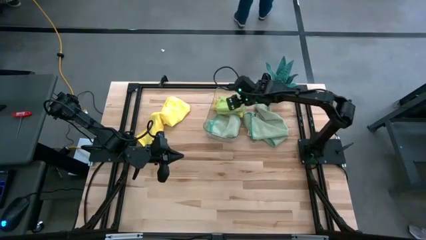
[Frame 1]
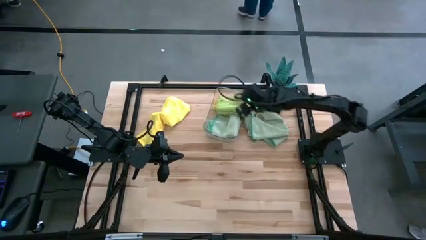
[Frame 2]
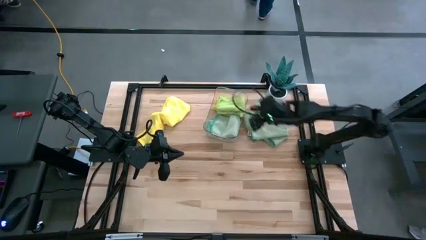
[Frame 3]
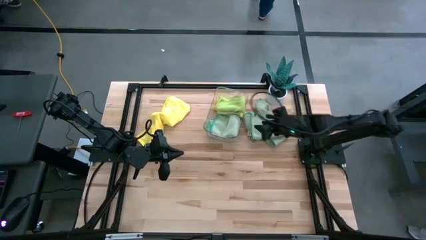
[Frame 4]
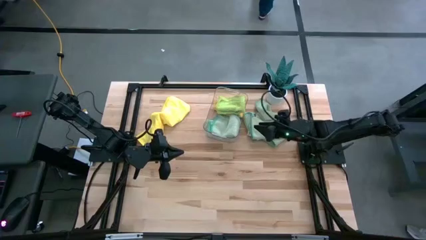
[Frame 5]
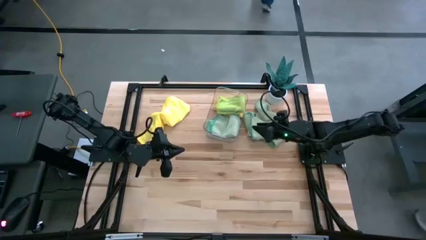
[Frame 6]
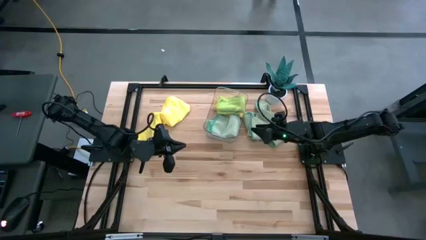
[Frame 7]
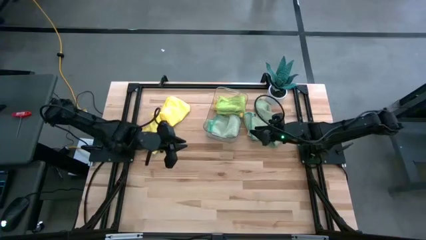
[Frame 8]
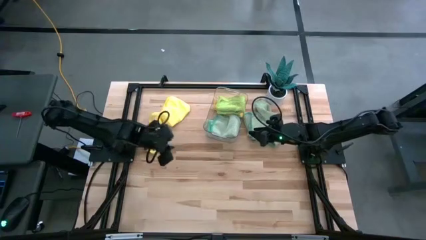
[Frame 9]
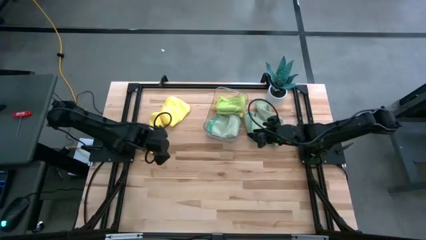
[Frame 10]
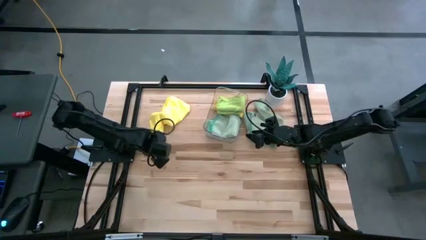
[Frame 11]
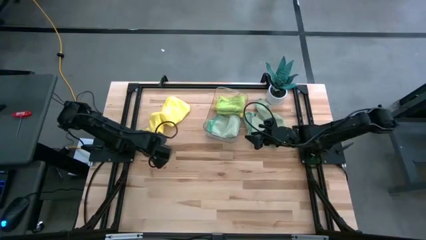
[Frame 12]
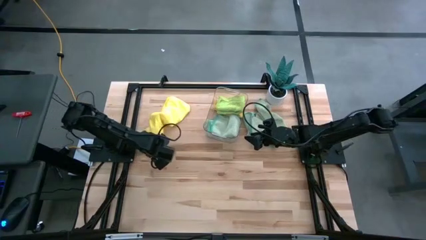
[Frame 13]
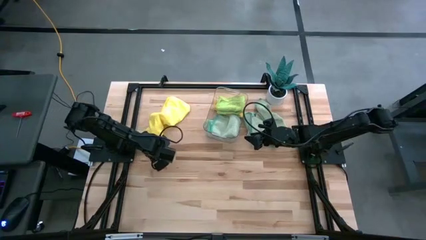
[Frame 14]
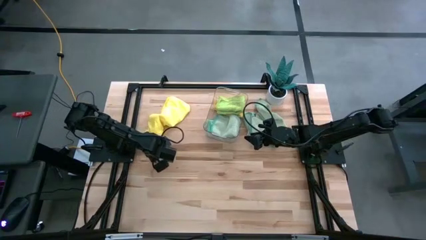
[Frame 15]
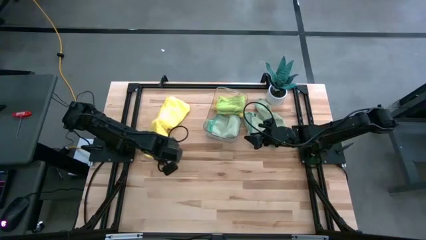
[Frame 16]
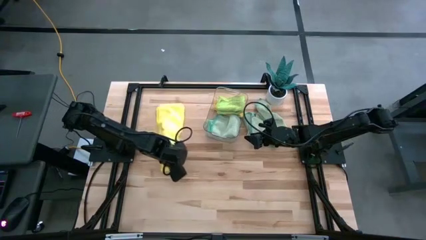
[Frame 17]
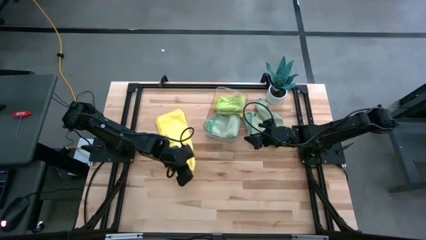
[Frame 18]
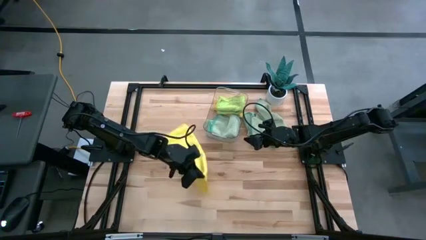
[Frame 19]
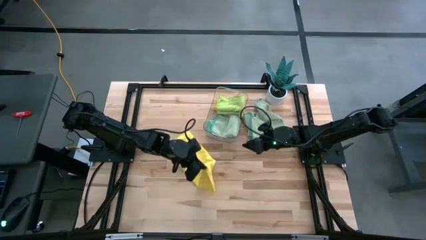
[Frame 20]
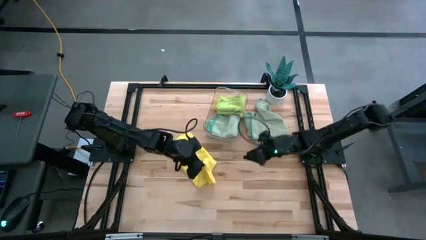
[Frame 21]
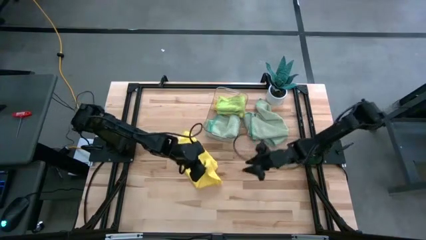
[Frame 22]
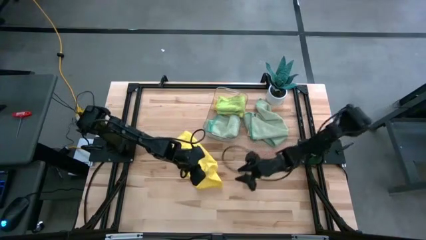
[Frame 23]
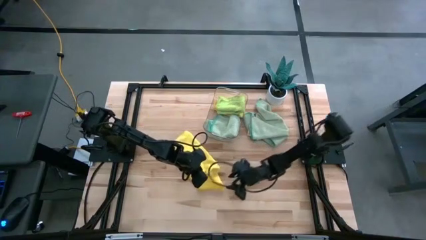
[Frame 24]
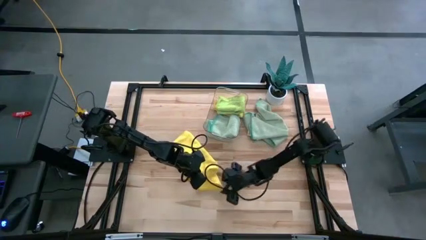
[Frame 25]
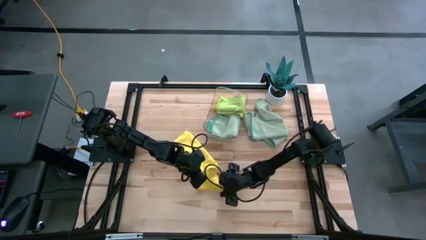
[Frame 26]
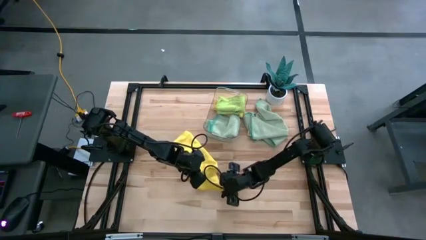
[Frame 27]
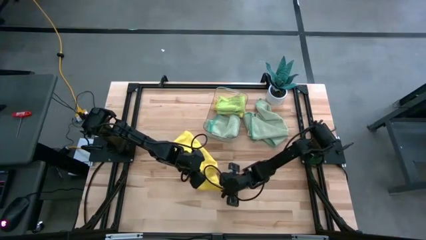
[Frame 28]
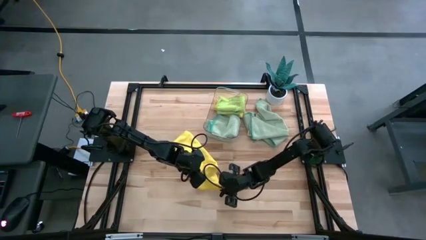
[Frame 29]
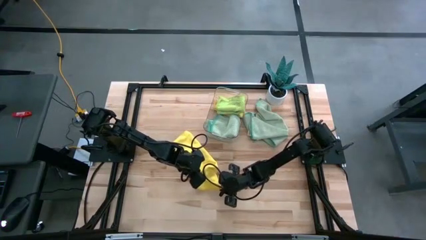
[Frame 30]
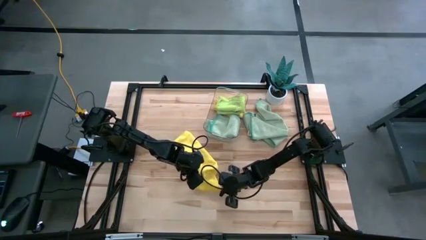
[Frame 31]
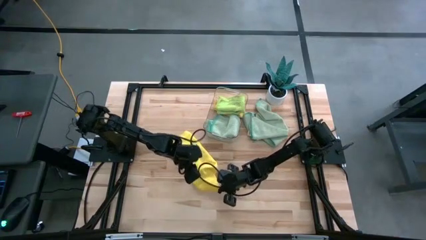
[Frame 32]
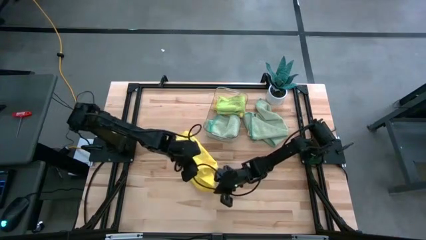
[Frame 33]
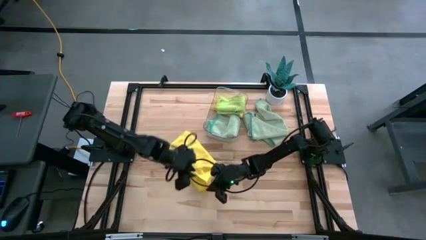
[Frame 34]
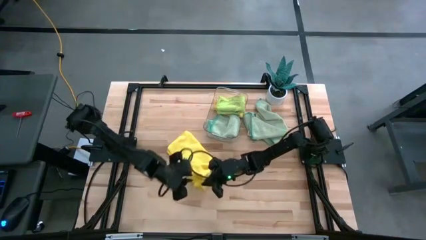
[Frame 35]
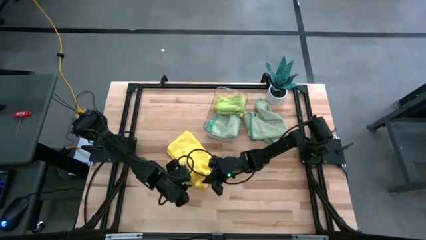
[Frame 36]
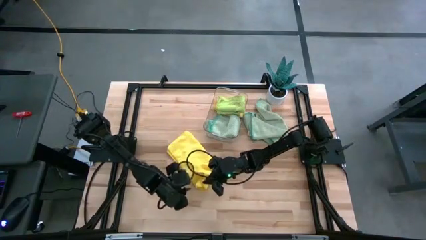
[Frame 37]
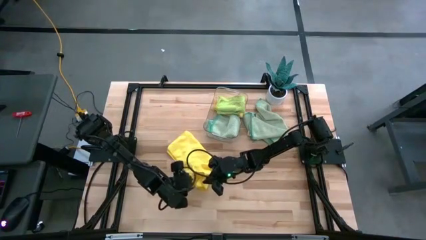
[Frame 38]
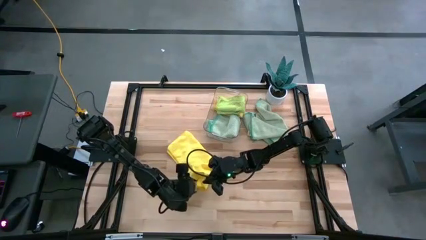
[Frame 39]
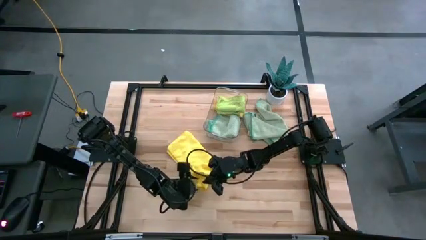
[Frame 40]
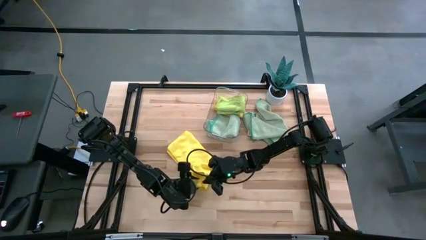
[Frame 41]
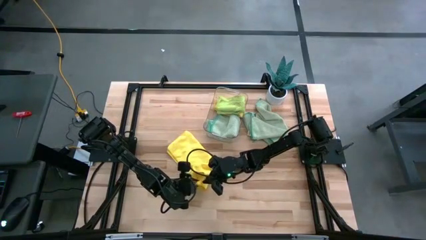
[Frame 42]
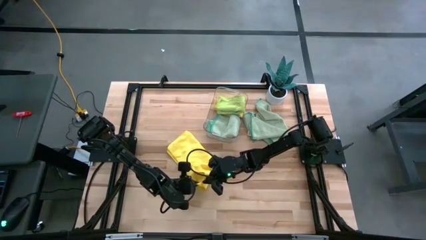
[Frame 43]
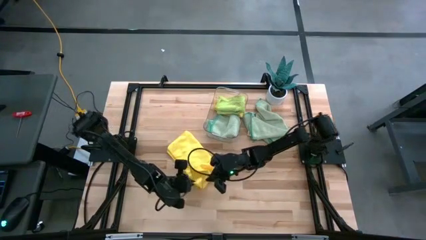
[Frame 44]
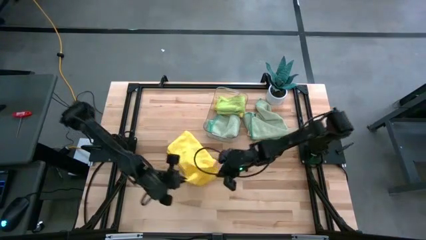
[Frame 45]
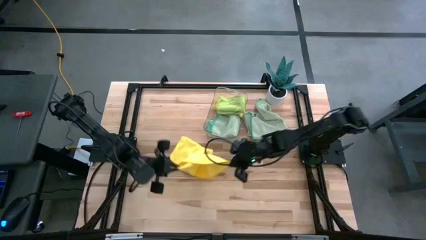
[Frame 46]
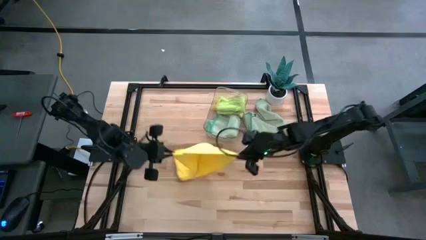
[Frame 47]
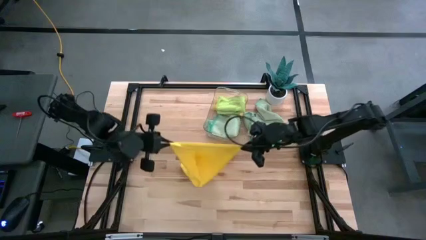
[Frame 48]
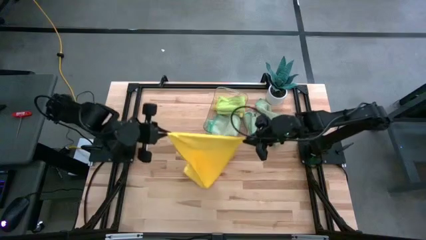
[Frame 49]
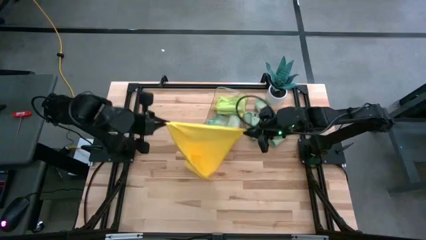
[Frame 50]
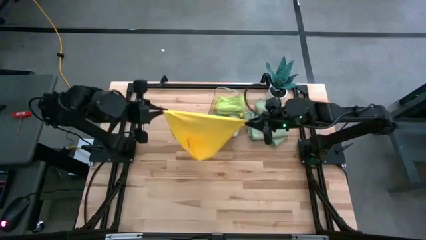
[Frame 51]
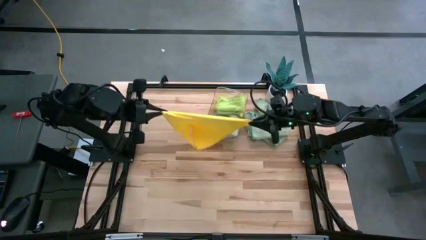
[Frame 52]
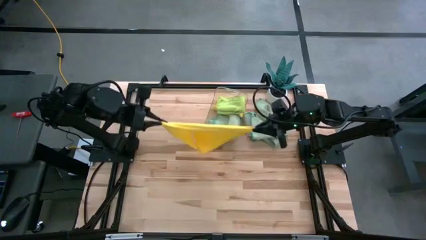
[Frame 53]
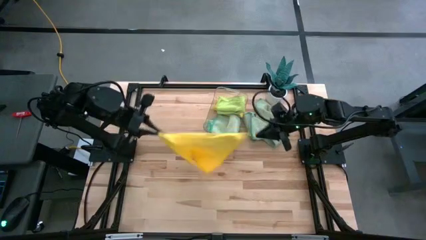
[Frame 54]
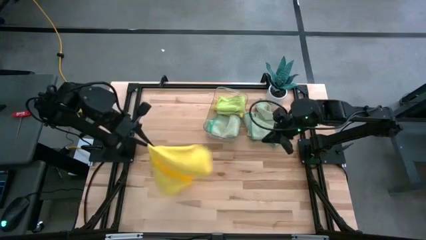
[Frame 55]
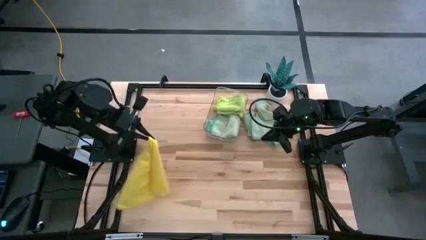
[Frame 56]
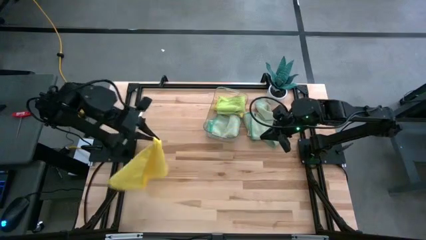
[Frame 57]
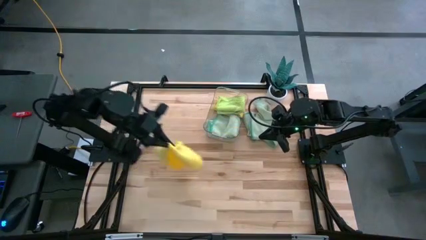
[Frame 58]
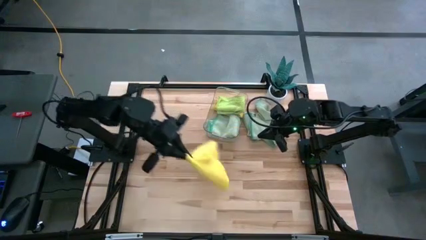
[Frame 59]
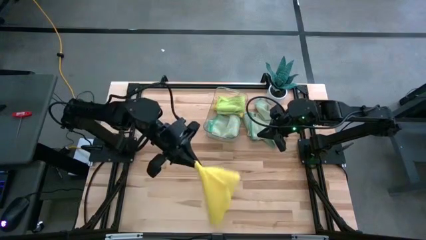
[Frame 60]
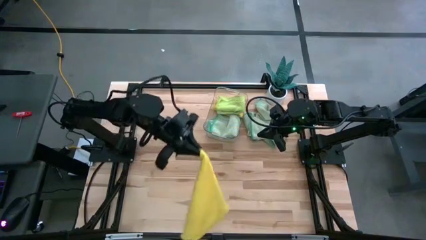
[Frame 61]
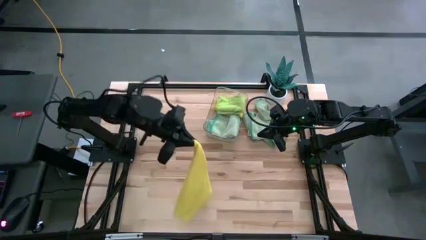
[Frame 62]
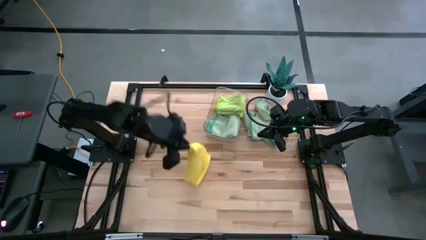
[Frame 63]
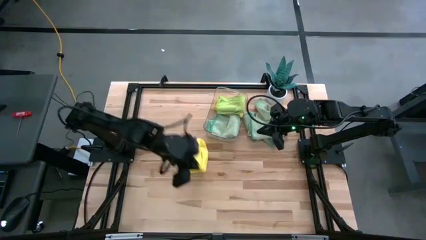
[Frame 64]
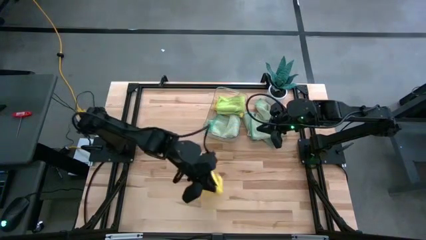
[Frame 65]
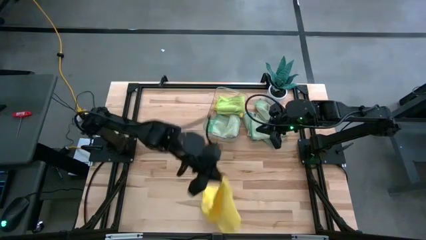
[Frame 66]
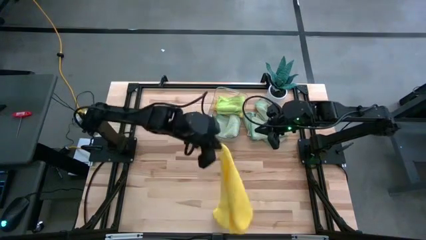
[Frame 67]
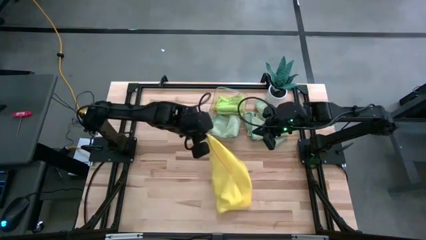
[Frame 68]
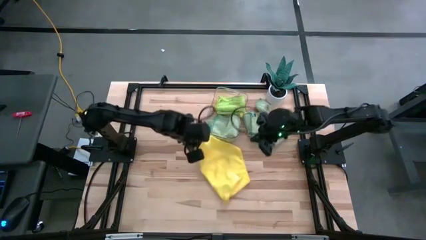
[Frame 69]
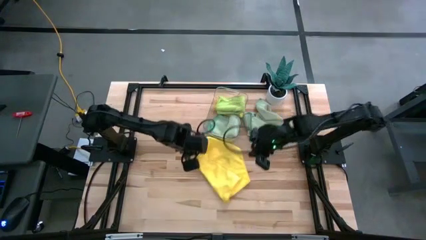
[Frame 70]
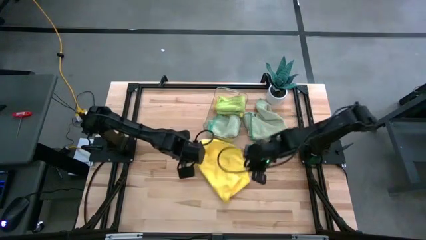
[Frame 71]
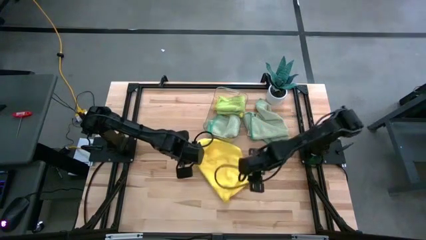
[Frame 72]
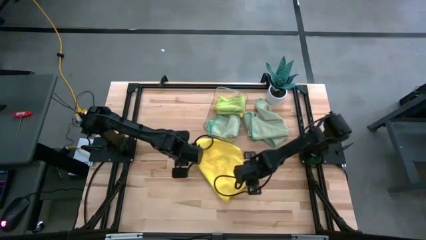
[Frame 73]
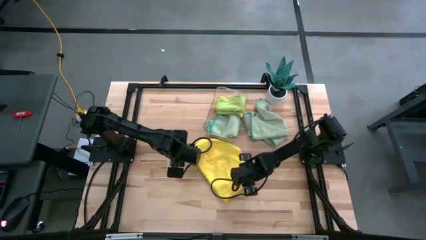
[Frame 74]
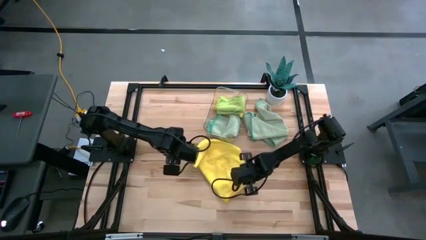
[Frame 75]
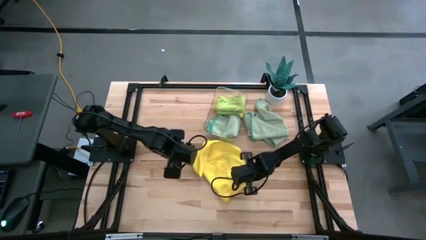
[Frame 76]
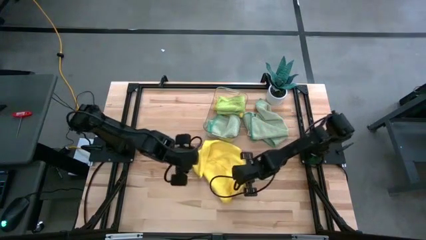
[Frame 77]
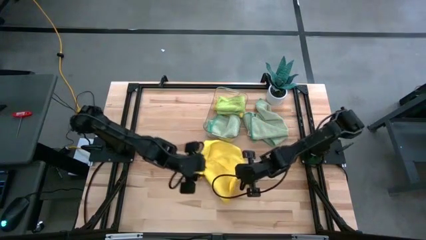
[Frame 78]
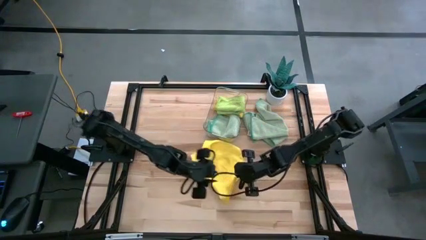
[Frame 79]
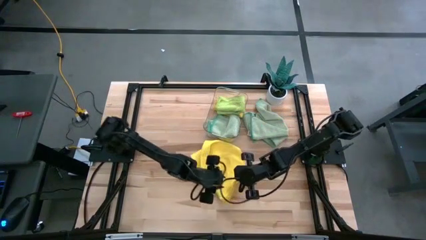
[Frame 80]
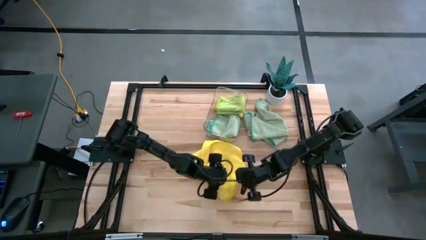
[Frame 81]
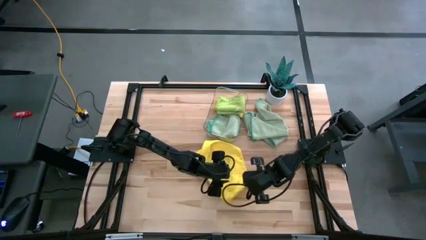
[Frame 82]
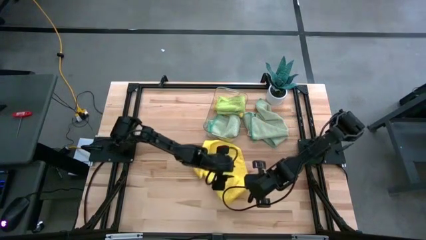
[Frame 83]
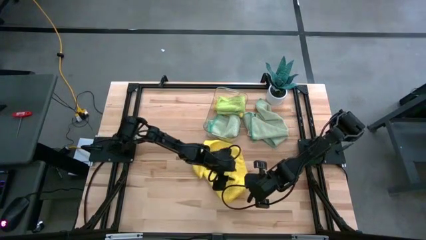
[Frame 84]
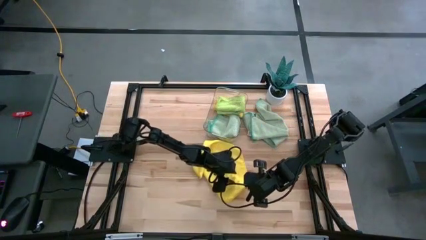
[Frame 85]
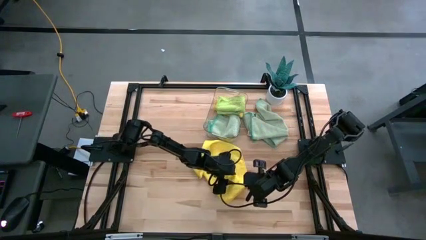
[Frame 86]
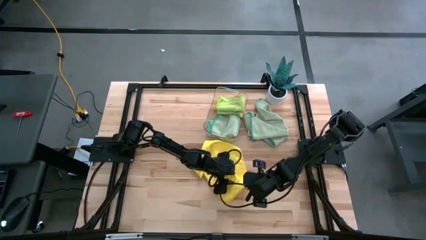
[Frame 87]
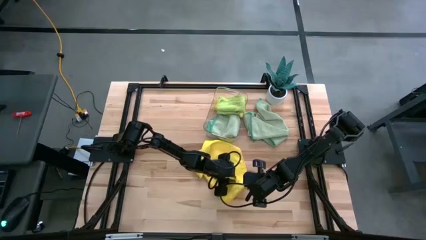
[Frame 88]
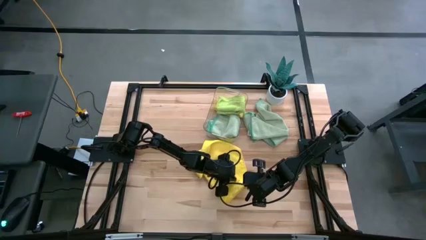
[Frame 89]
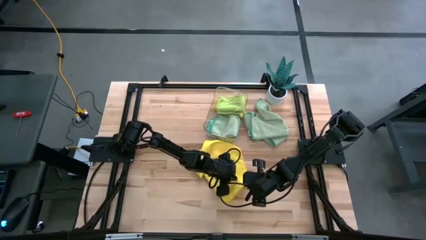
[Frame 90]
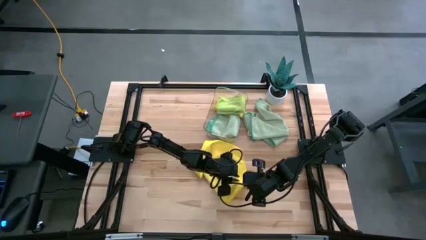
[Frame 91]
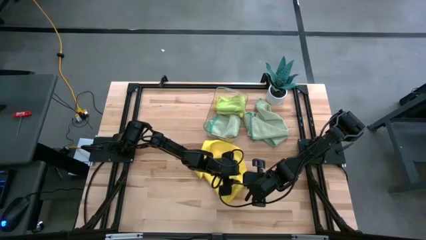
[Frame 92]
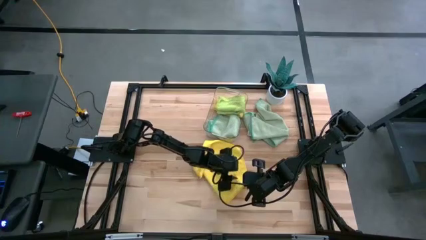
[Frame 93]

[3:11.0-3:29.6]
Task: Fold microfiber towels
Fold the yellow towel
